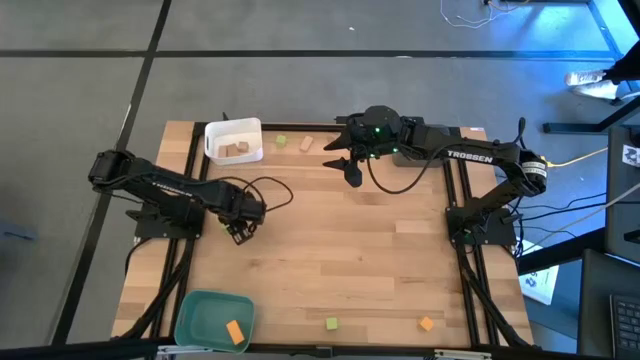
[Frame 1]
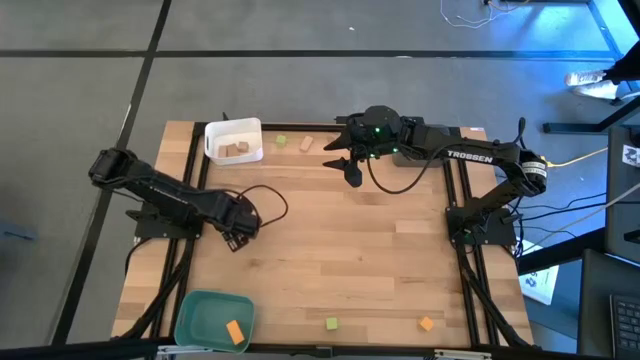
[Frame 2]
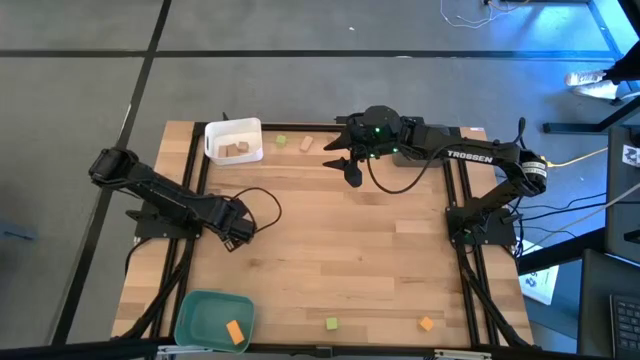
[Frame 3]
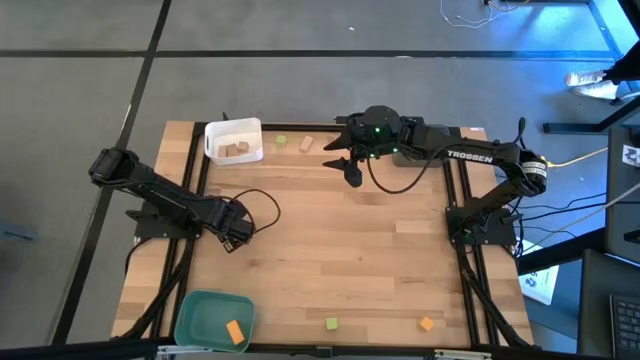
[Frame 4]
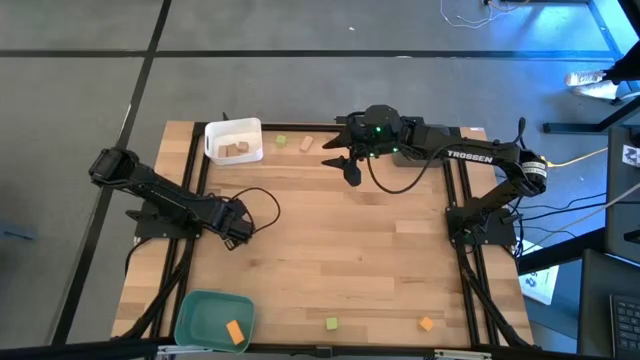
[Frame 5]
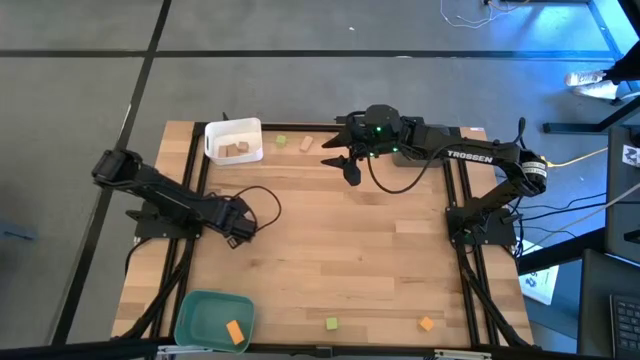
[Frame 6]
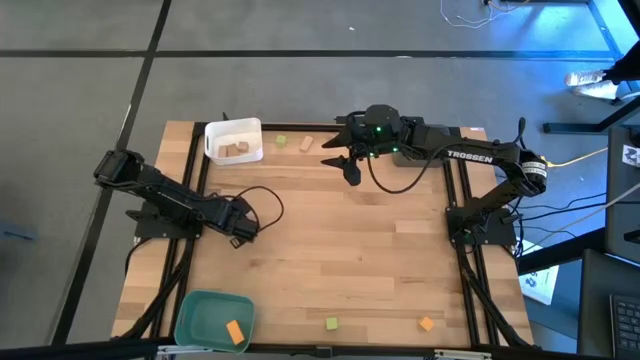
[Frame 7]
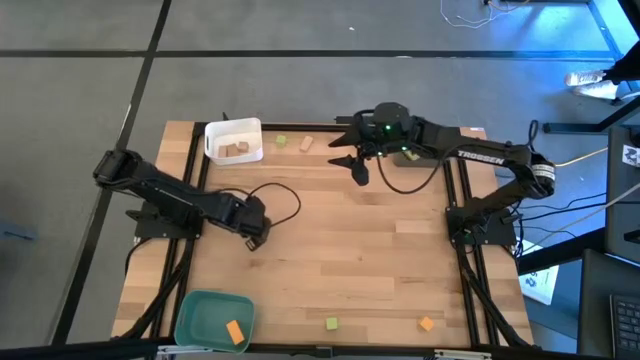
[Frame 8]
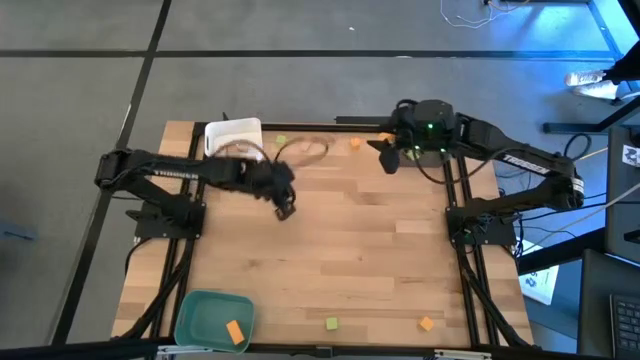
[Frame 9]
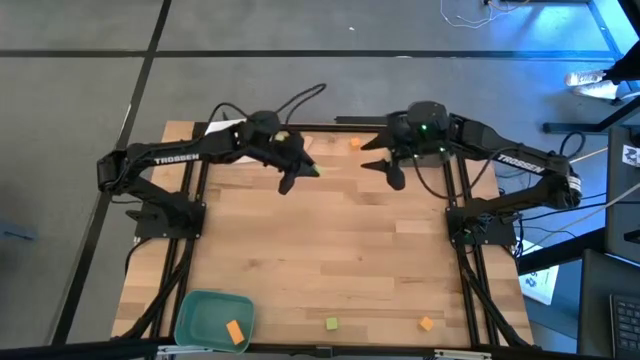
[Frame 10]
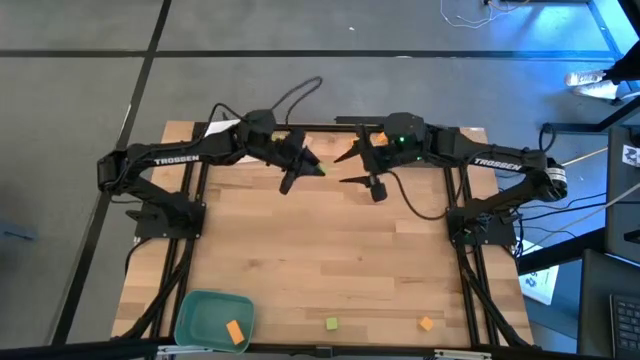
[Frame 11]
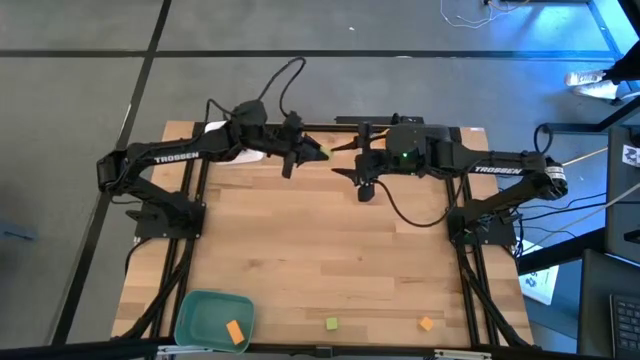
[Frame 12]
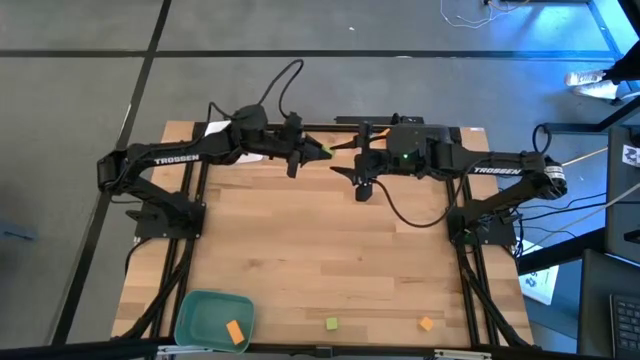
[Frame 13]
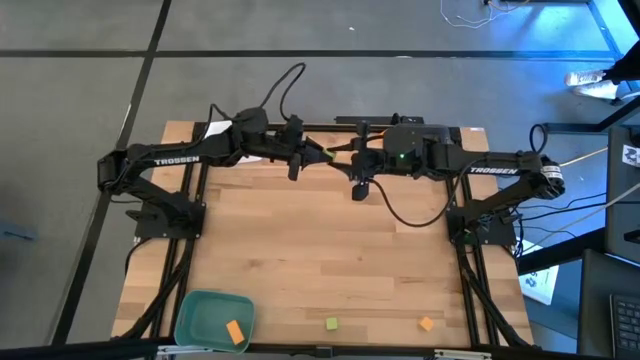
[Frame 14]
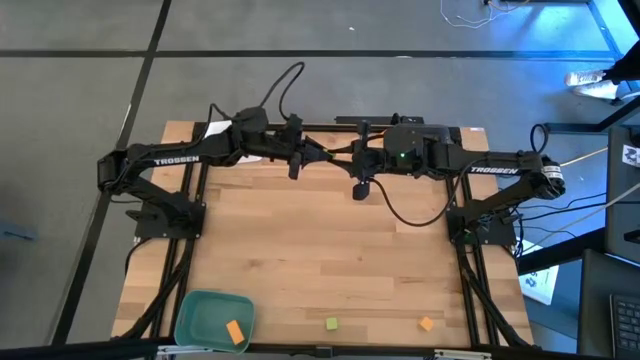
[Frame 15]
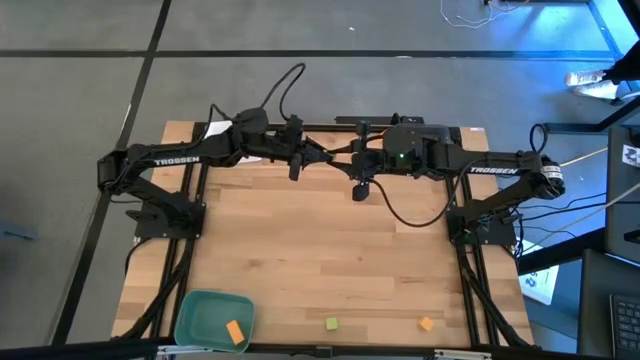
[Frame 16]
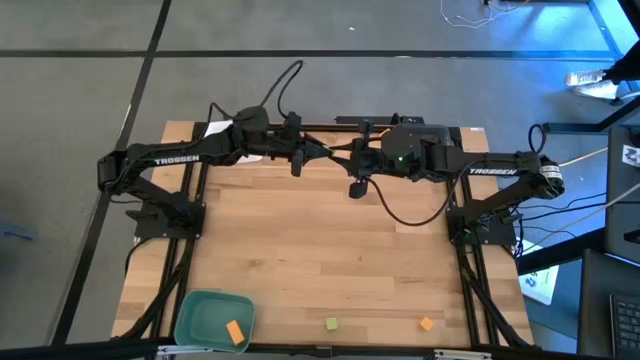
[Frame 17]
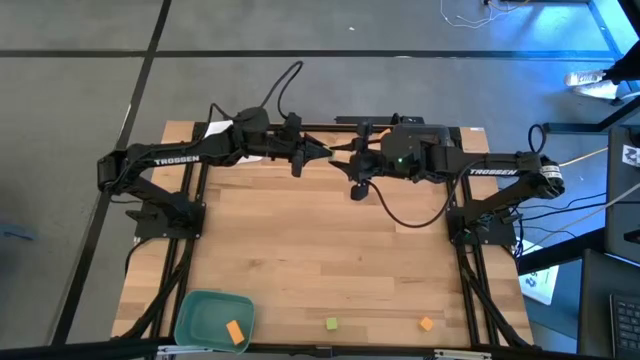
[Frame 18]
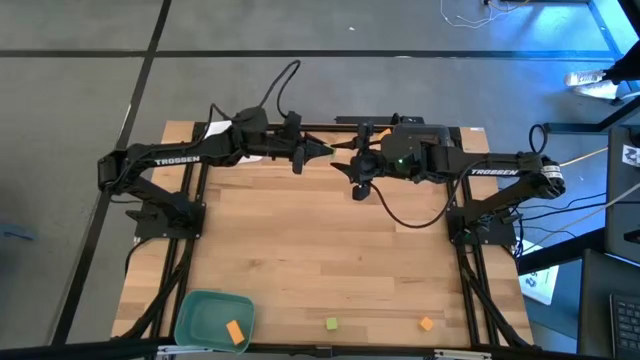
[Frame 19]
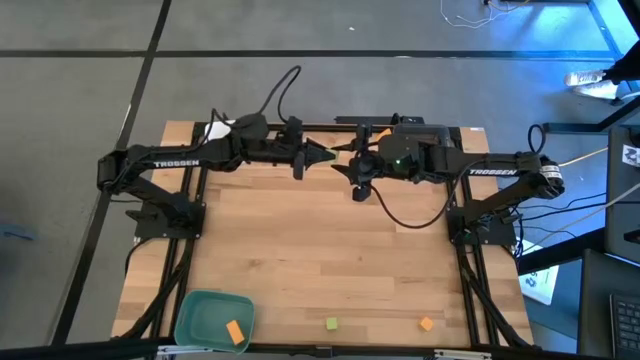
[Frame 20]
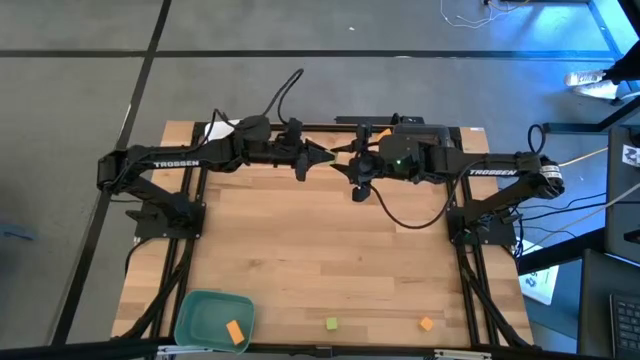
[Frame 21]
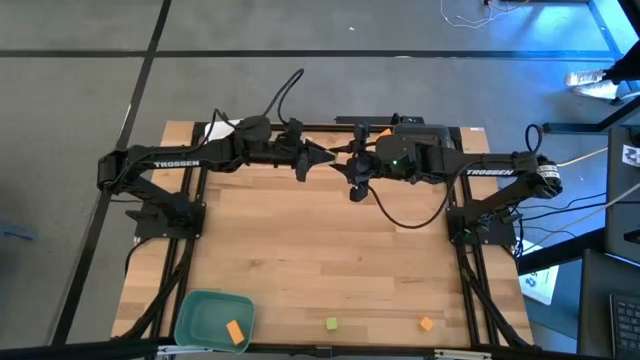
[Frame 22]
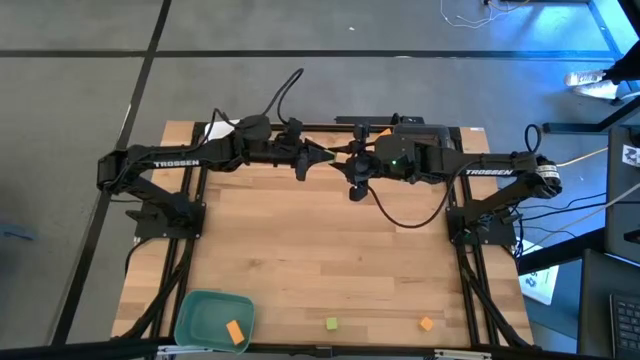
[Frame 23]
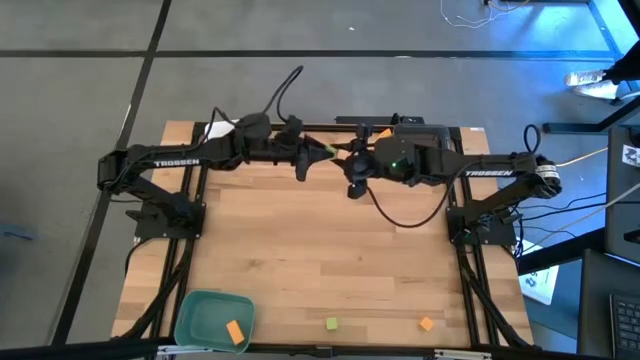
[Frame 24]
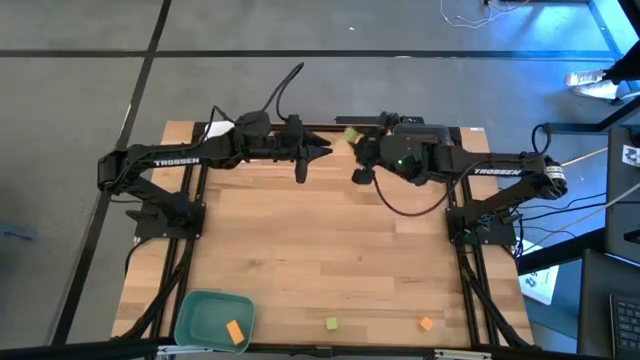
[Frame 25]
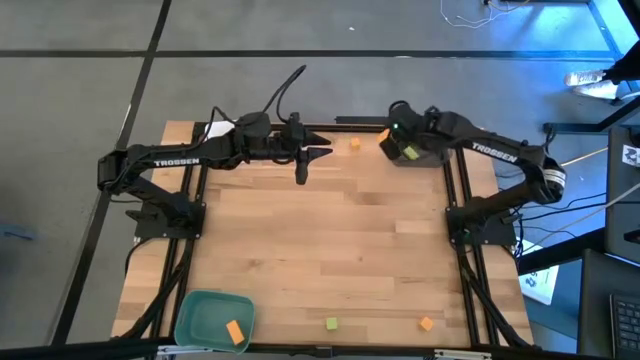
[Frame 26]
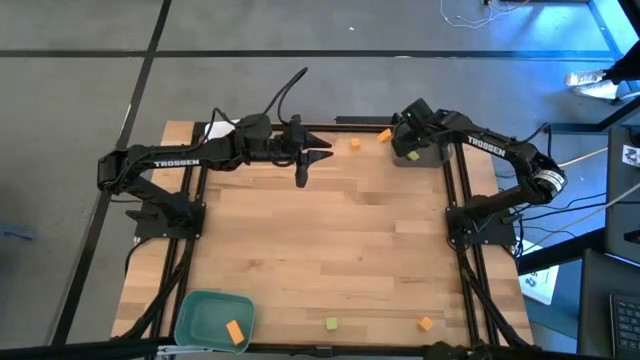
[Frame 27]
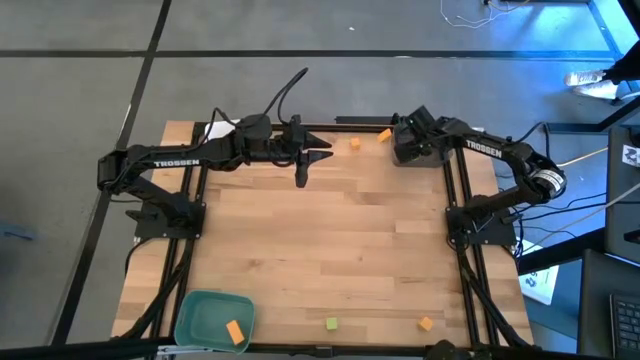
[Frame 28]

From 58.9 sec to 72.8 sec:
Task: Sort & place blocks by color
Put the green block into the black bin

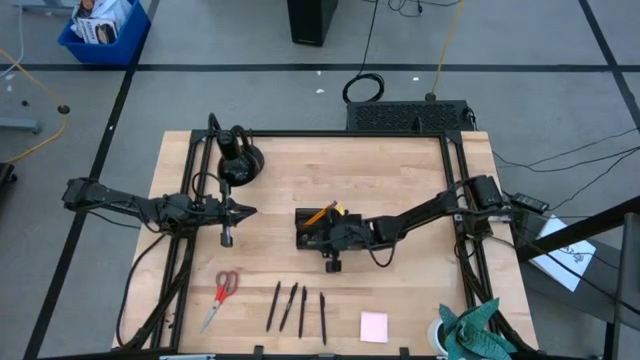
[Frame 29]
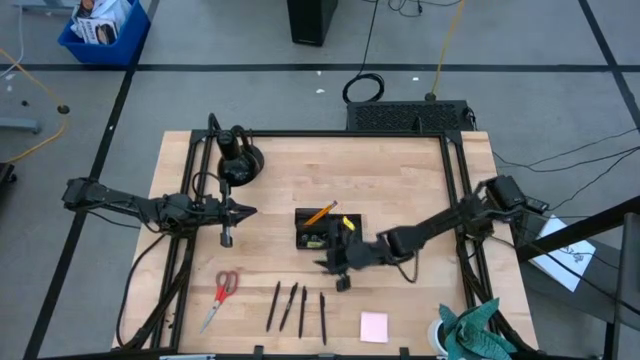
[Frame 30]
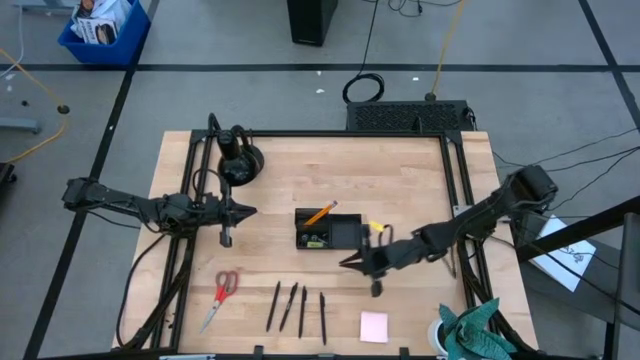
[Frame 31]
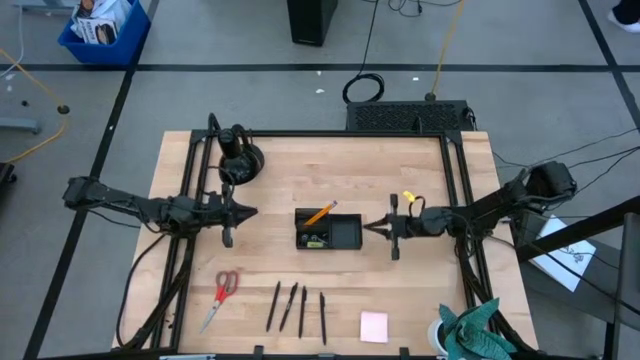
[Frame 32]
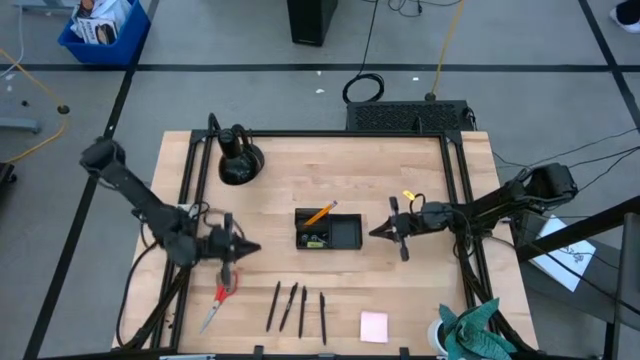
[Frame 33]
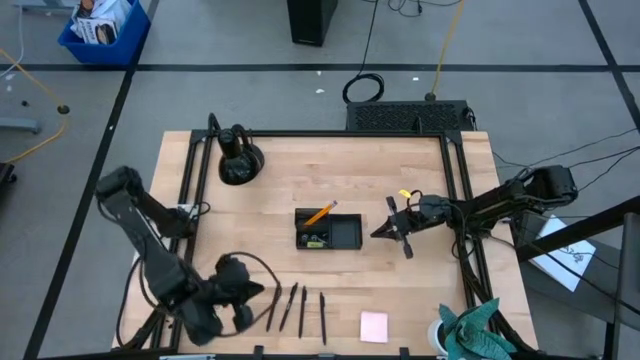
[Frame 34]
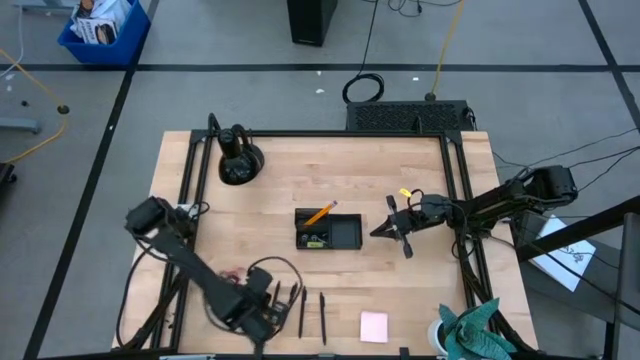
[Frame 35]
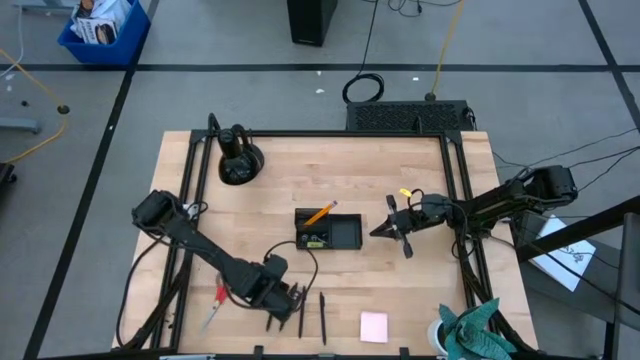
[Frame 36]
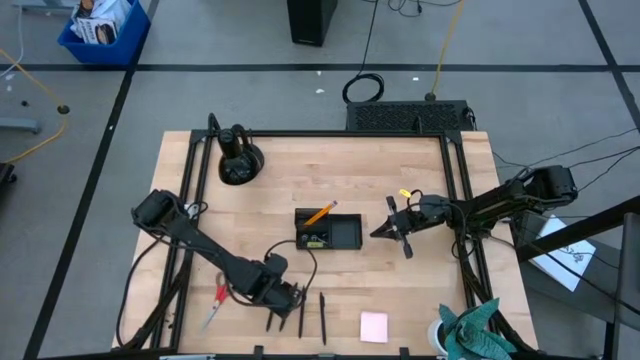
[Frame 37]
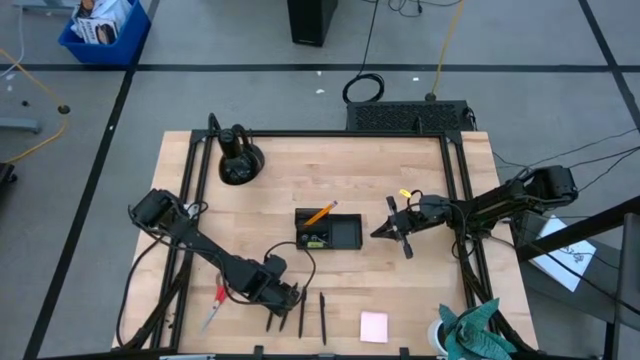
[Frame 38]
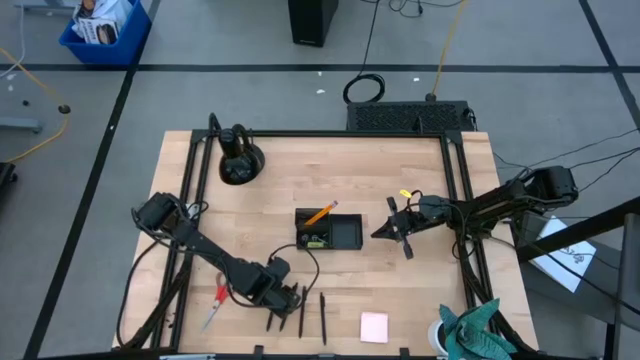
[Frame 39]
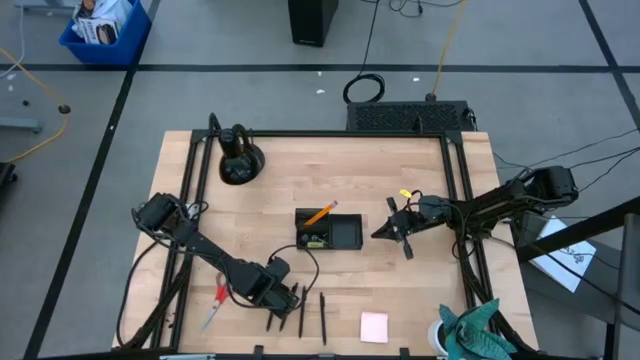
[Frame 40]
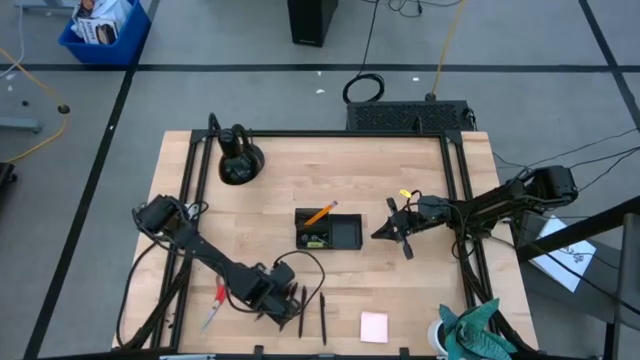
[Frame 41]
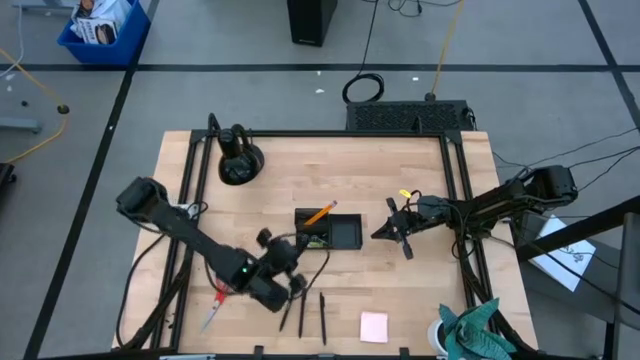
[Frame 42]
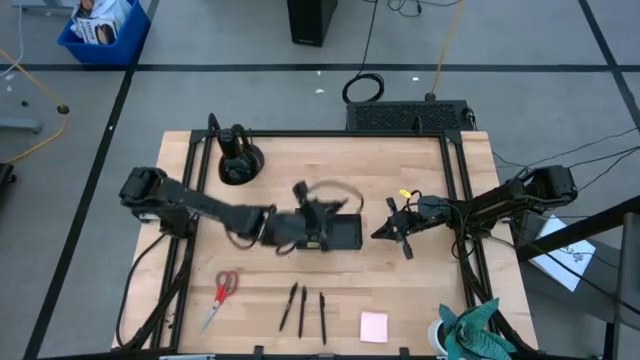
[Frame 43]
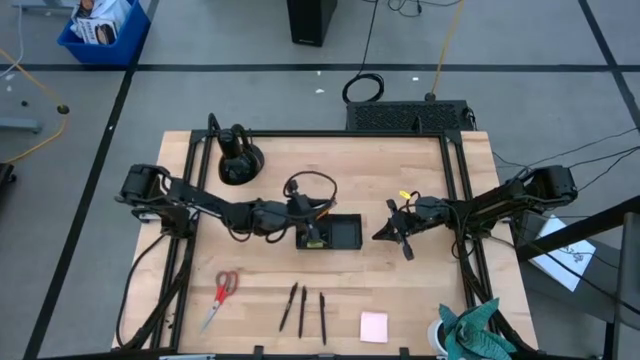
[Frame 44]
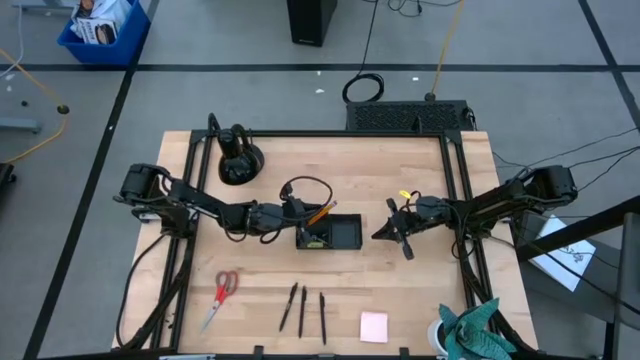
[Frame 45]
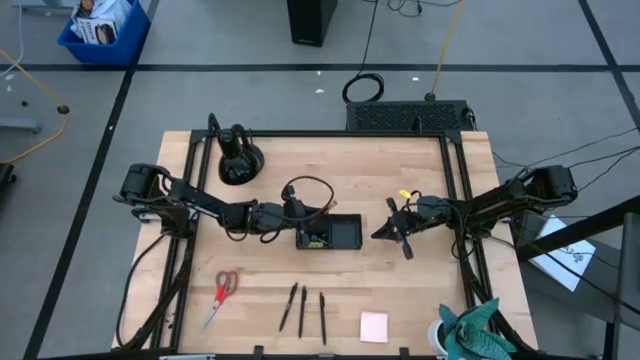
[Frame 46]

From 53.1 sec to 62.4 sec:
Task: Pick and place office supplies into organizer
Put the black pen into the black desk organizer
